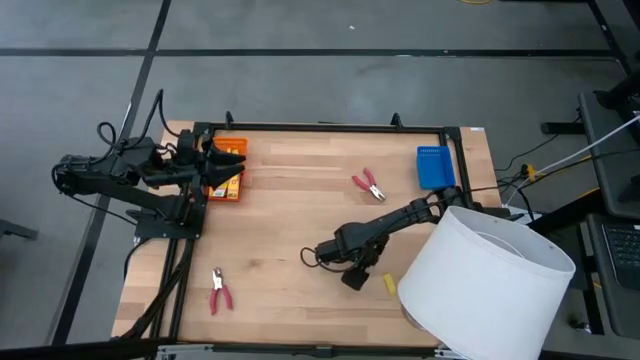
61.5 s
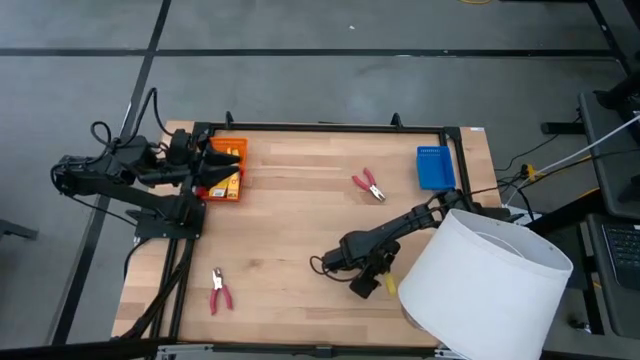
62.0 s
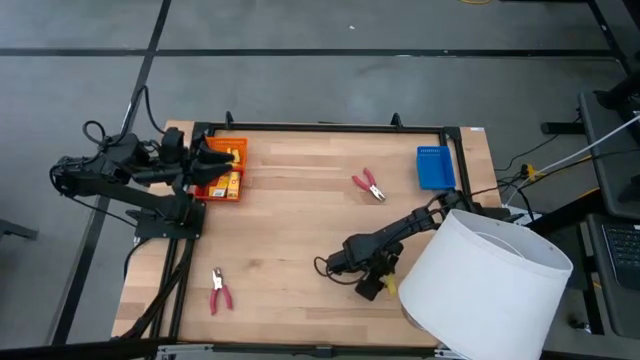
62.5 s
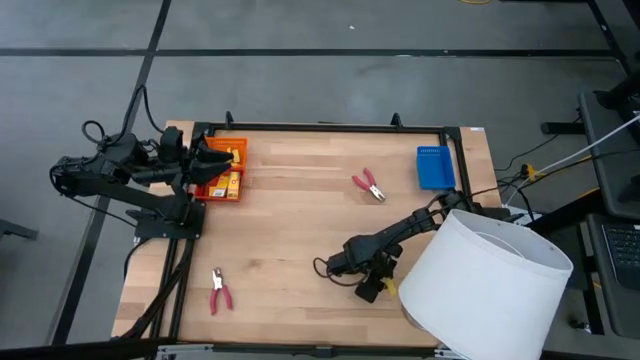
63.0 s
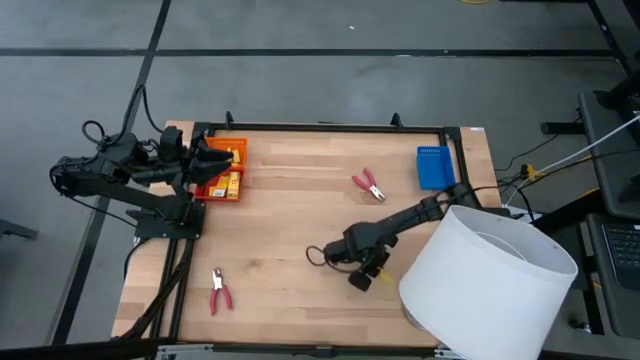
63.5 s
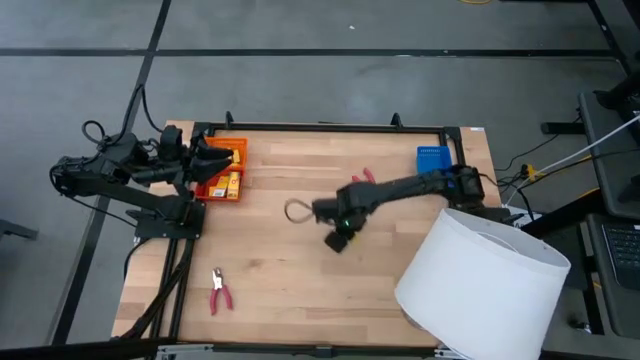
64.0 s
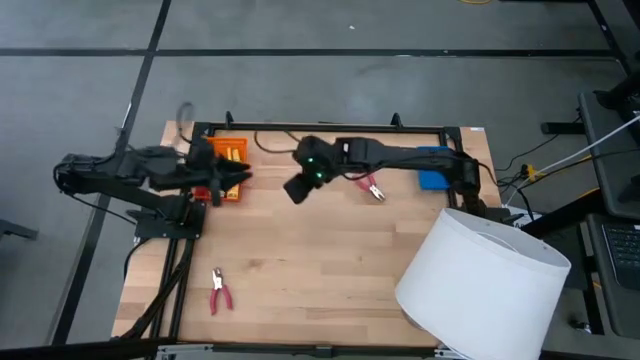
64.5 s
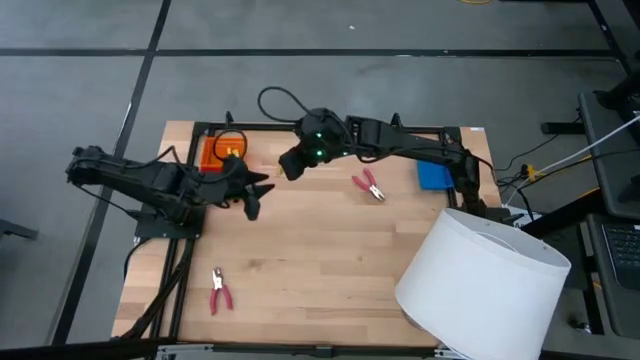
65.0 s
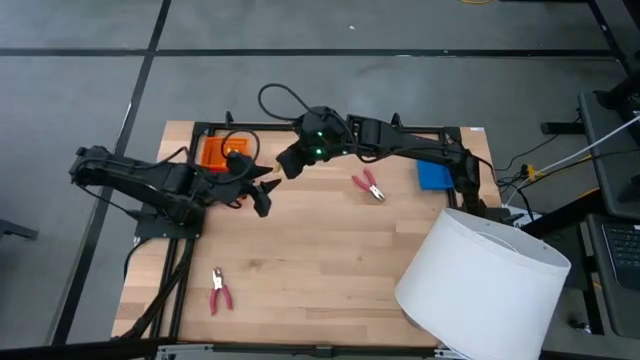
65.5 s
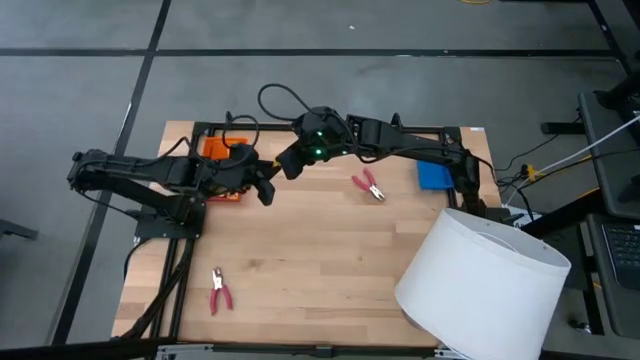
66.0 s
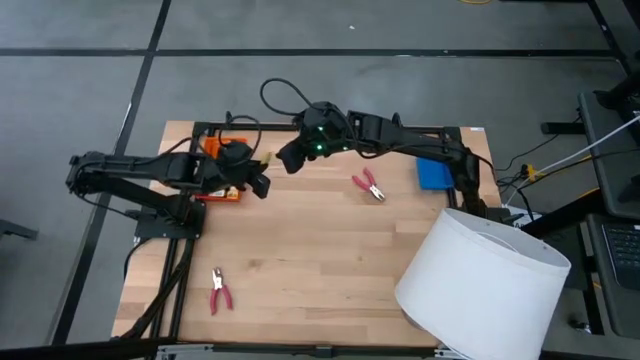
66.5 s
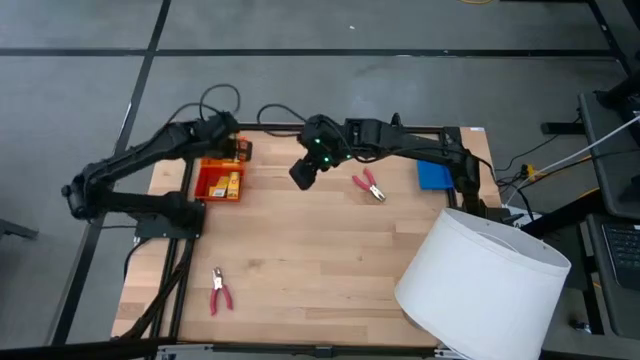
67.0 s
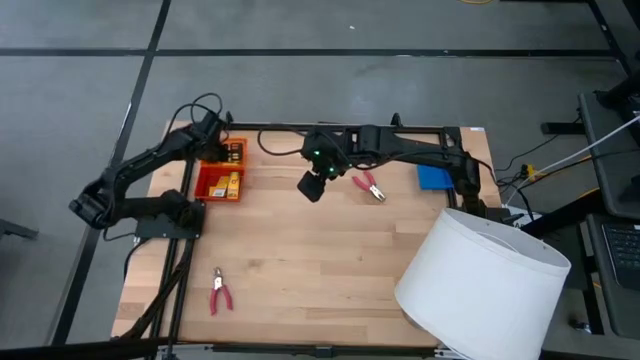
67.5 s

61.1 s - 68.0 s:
Task: Pick & Place School Supplies
Put the yellow eraser into the orange bin

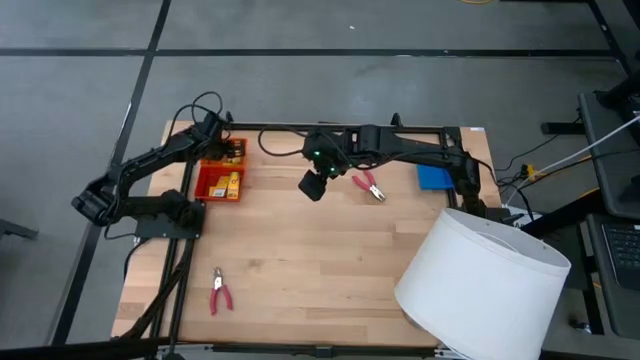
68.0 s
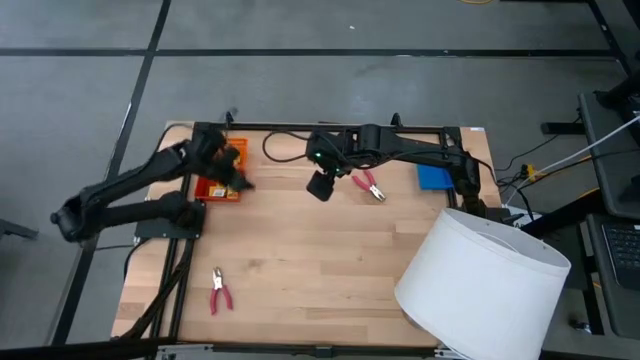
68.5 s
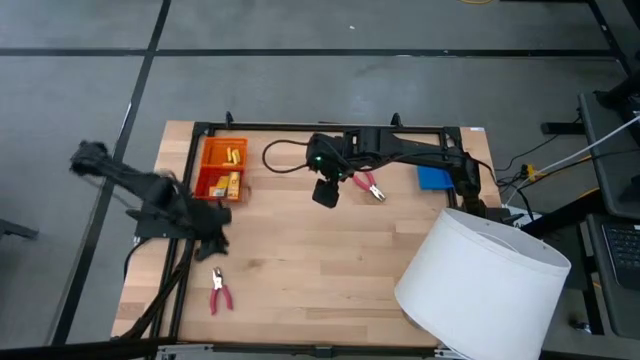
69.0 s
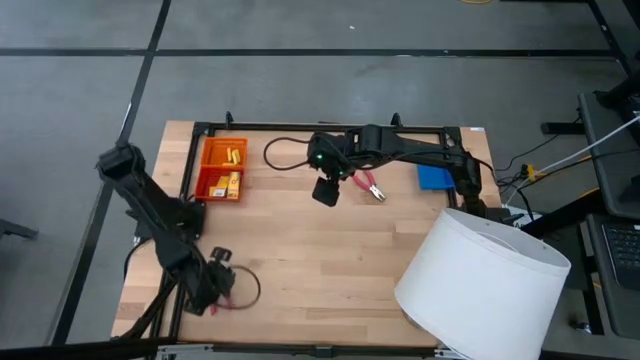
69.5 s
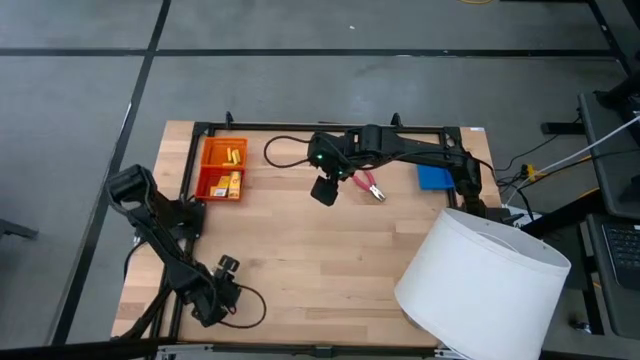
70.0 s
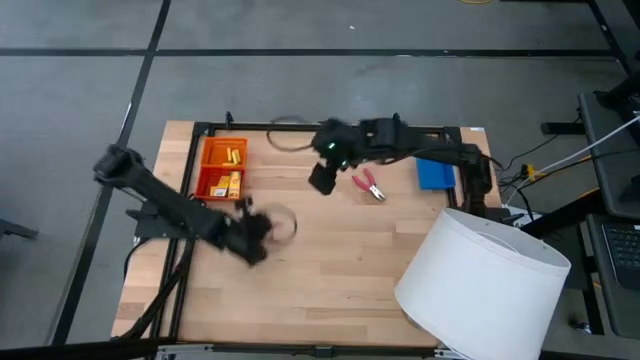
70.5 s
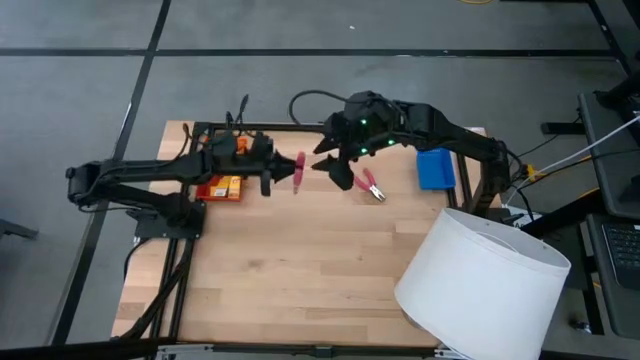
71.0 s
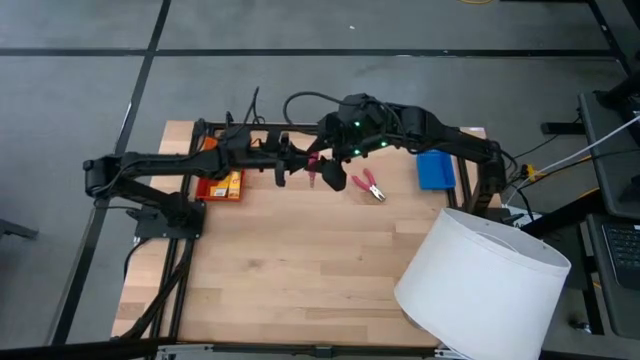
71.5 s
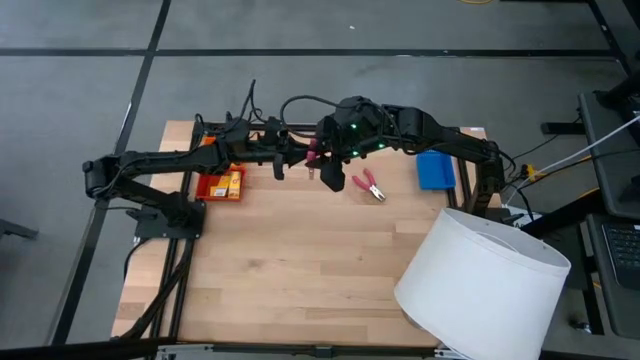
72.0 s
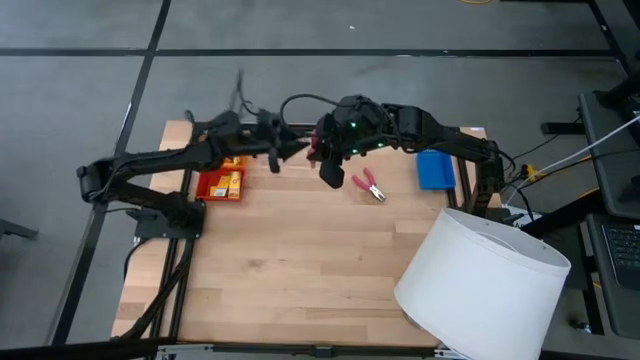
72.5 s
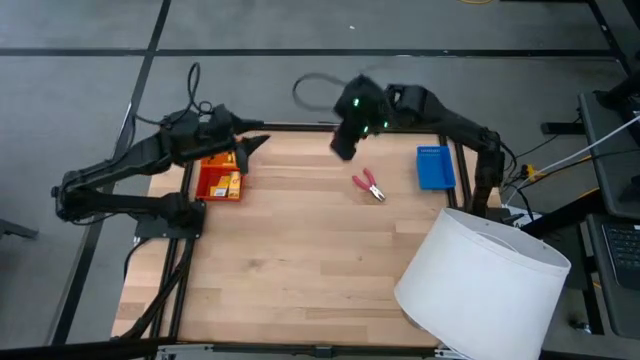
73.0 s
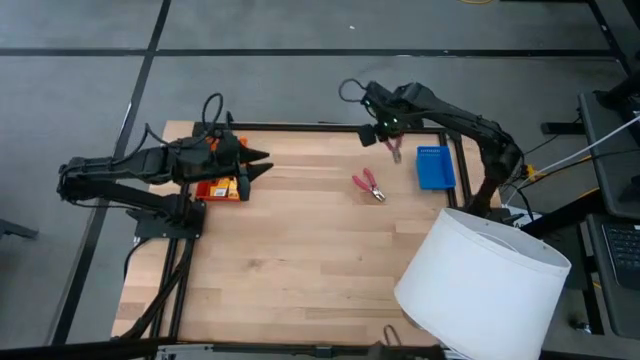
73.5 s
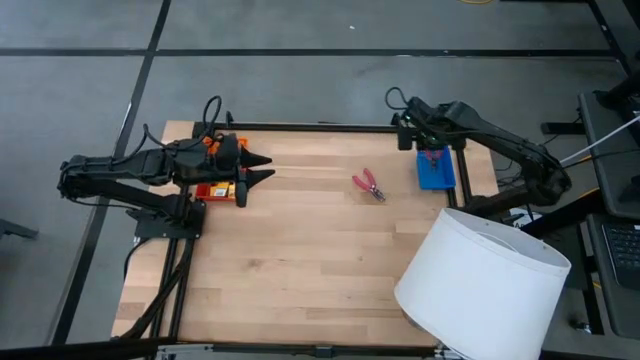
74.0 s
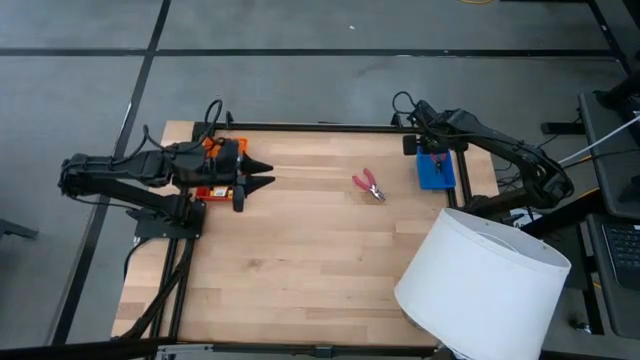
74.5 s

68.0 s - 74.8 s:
Put the bottom red pliers into the blue bin

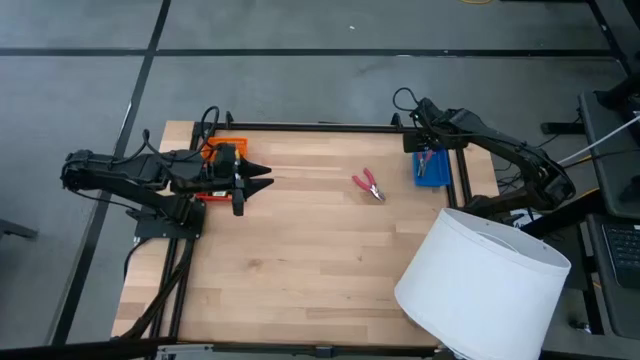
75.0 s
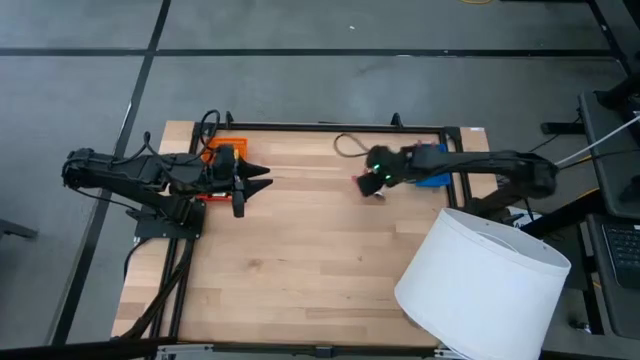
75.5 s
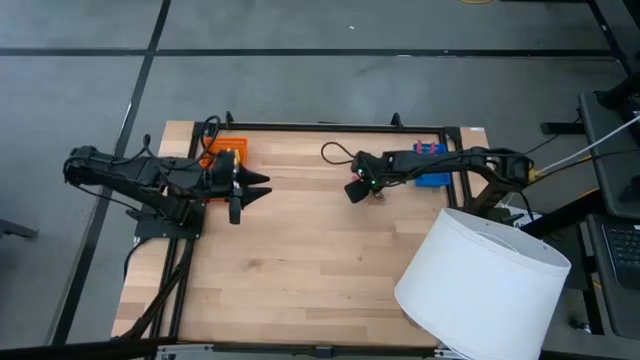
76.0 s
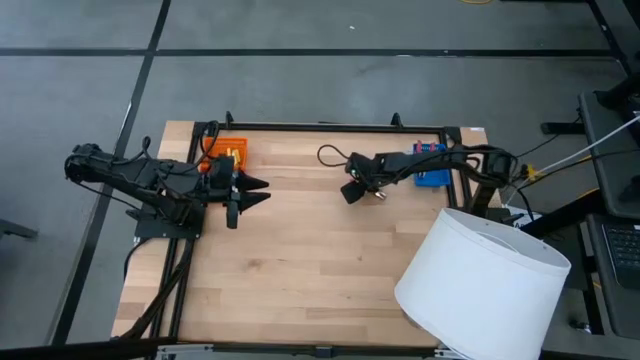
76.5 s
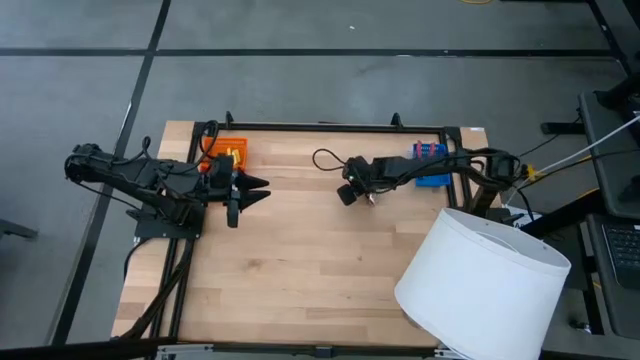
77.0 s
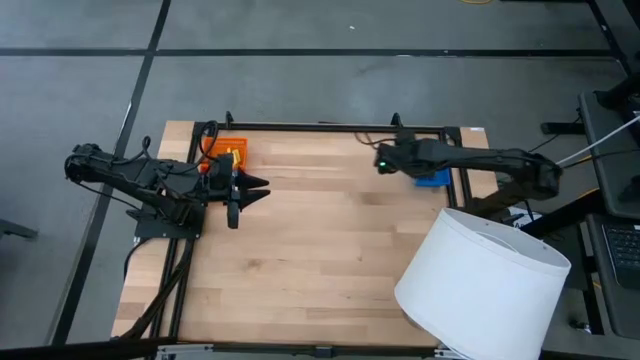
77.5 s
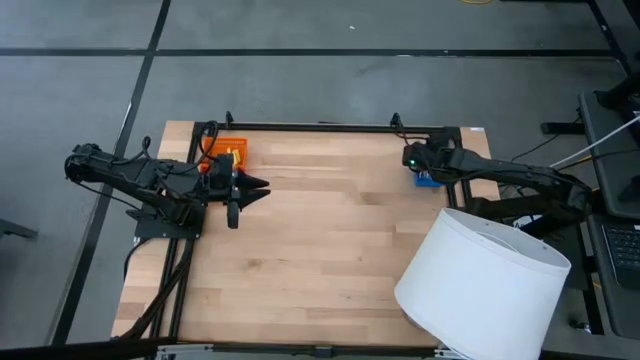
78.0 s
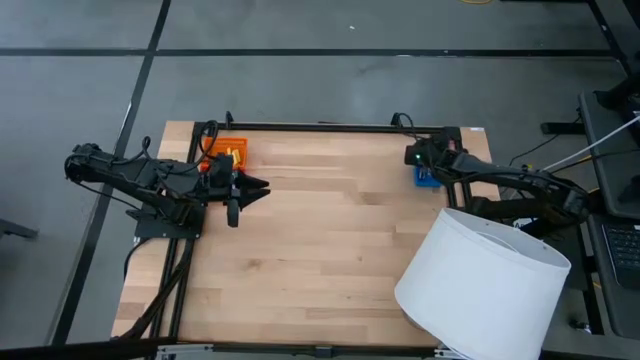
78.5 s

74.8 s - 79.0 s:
Put the red pliers into the blue bin

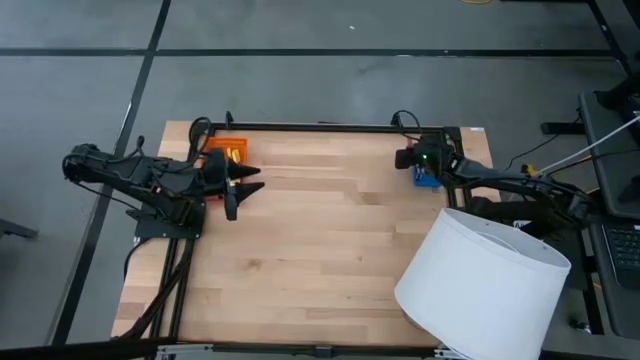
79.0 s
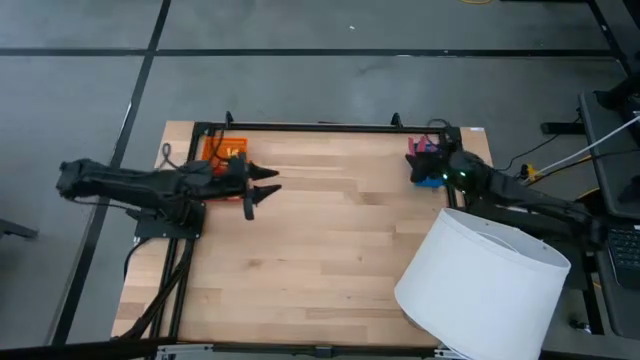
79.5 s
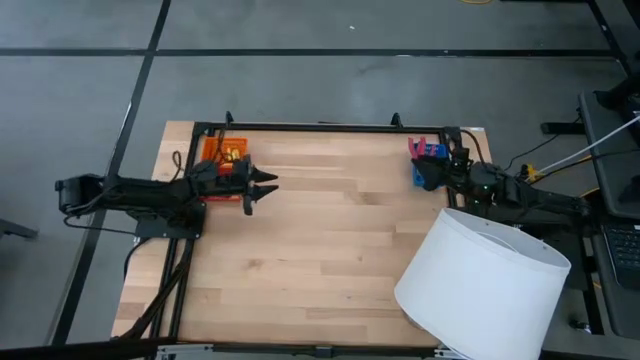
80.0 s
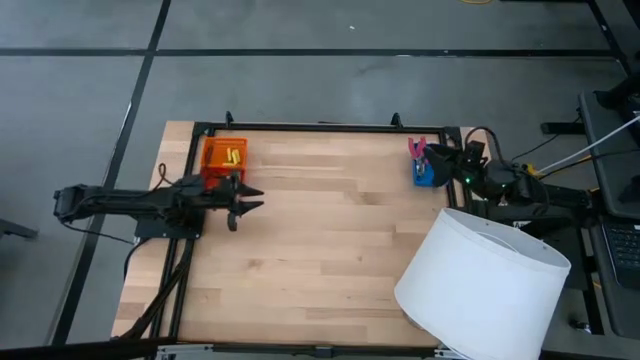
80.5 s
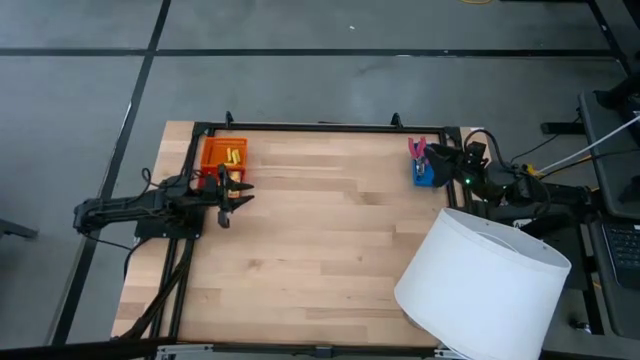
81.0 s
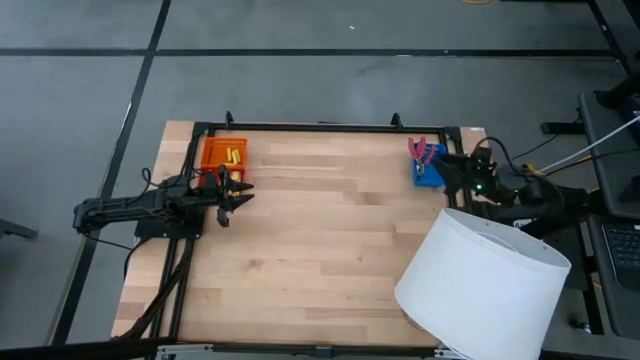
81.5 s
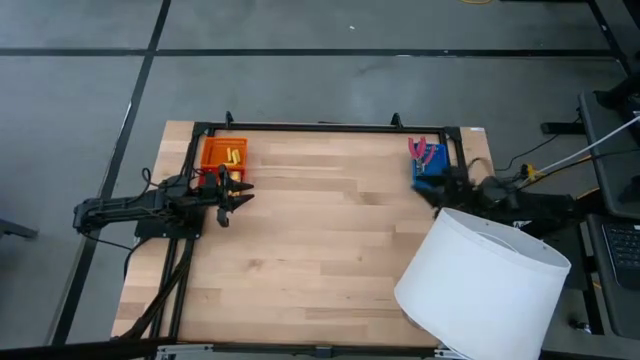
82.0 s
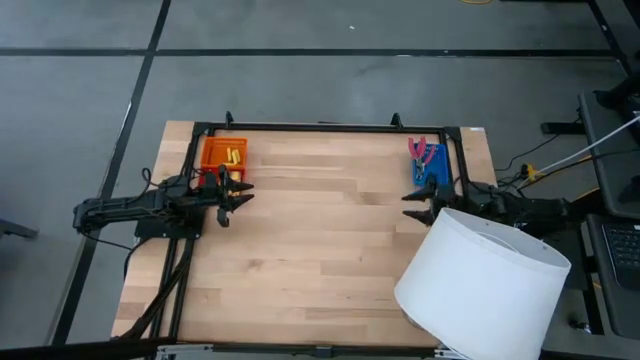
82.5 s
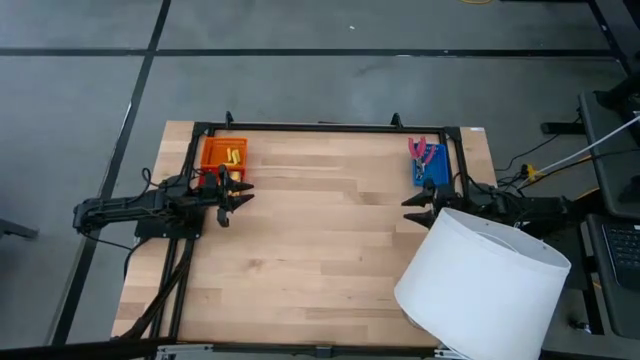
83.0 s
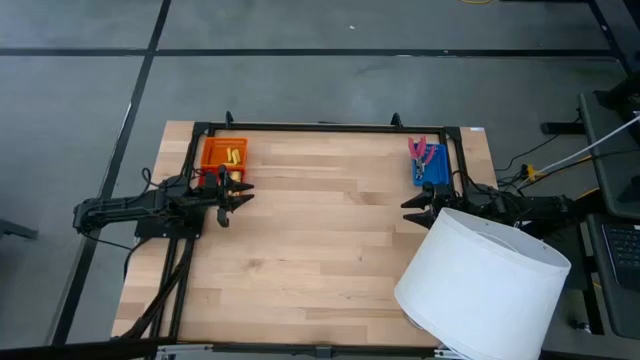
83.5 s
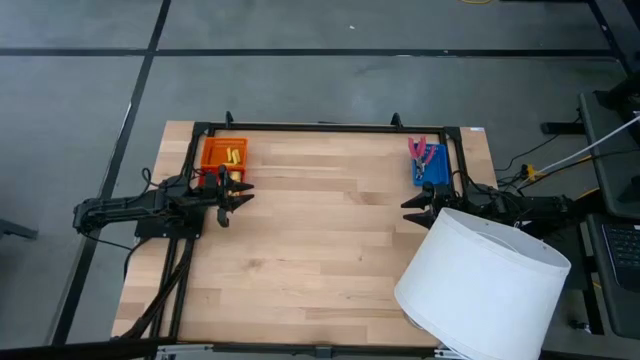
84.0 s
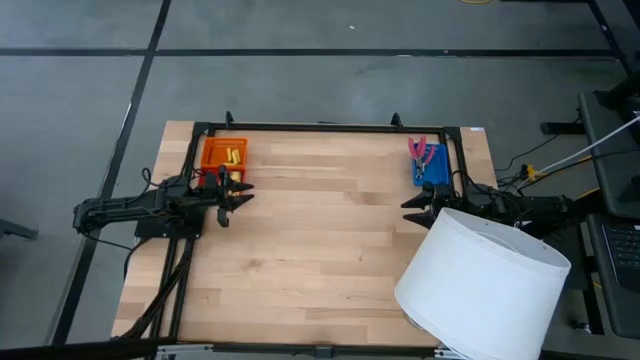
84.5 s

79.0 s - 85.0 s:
Return to Home Position
